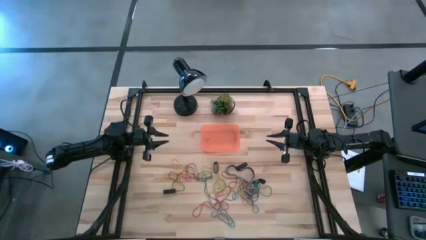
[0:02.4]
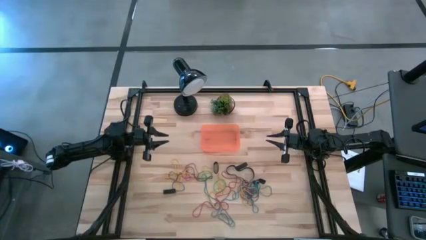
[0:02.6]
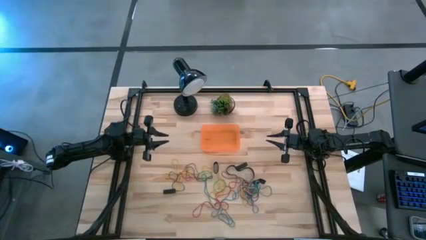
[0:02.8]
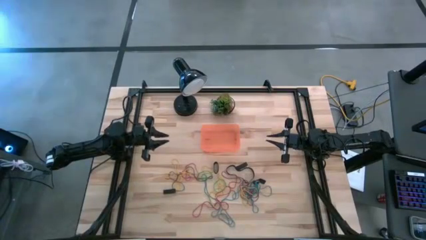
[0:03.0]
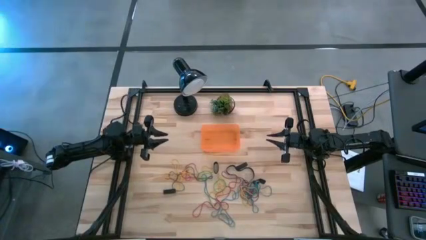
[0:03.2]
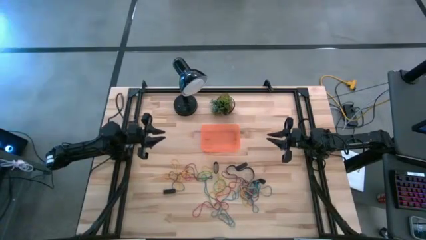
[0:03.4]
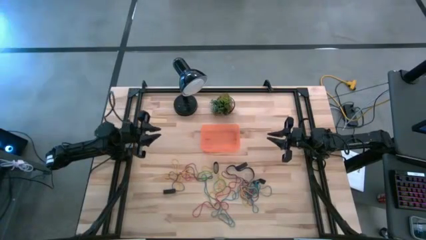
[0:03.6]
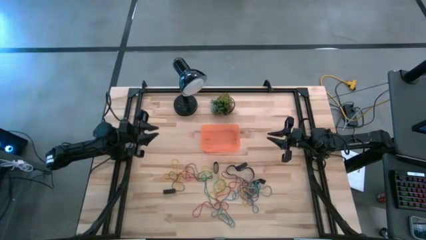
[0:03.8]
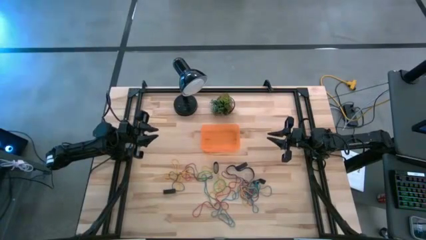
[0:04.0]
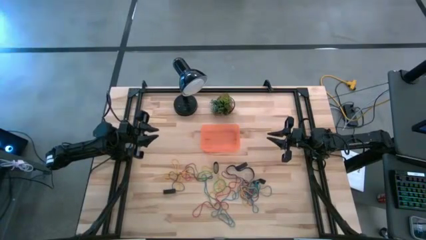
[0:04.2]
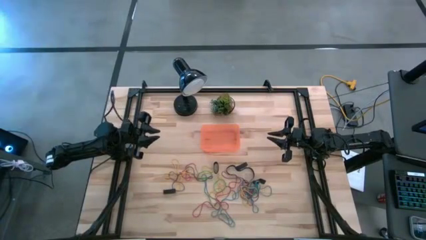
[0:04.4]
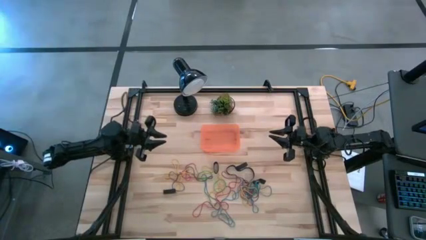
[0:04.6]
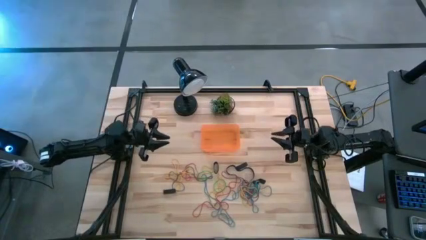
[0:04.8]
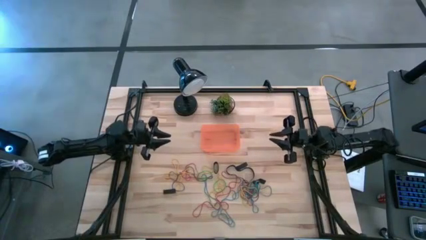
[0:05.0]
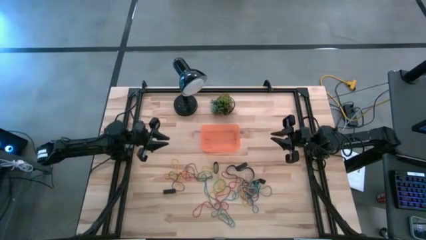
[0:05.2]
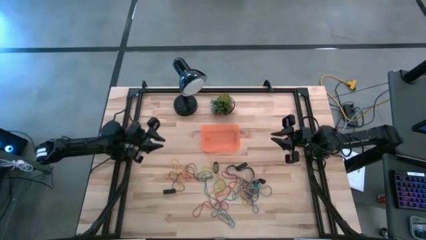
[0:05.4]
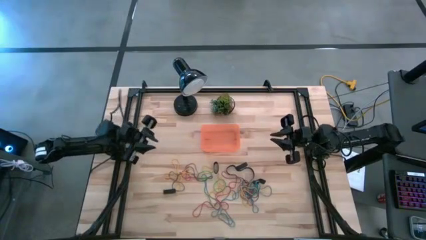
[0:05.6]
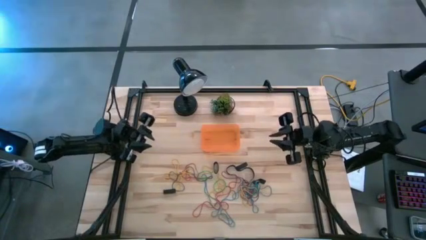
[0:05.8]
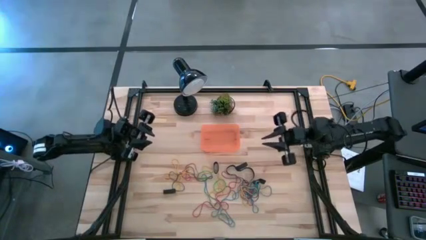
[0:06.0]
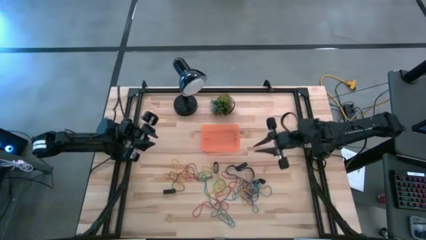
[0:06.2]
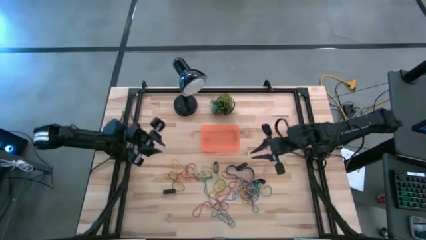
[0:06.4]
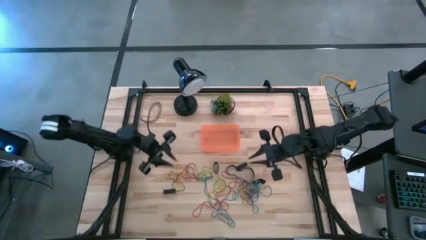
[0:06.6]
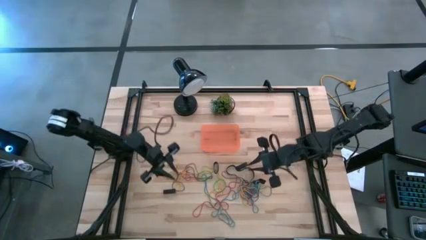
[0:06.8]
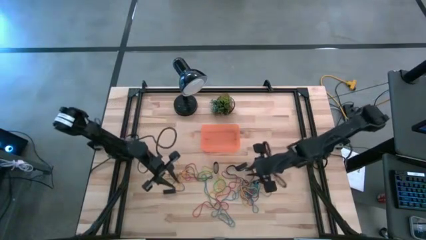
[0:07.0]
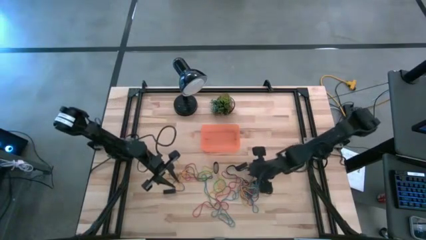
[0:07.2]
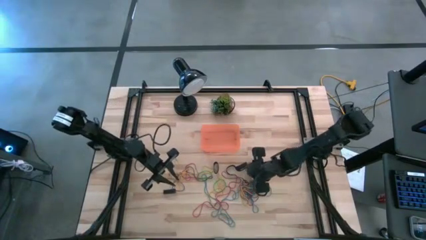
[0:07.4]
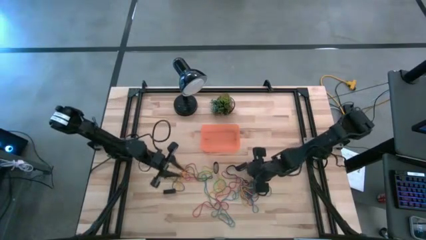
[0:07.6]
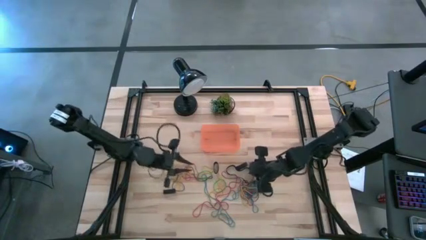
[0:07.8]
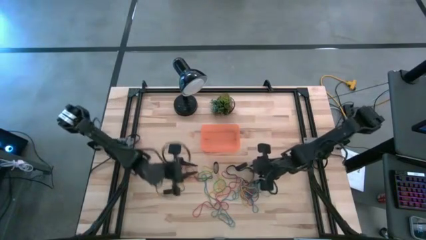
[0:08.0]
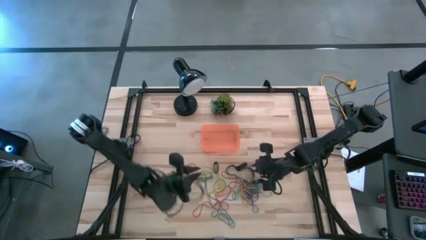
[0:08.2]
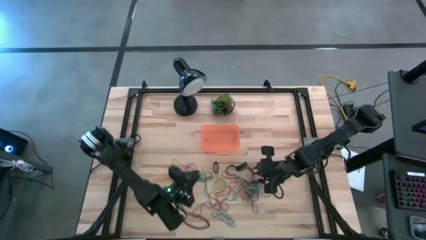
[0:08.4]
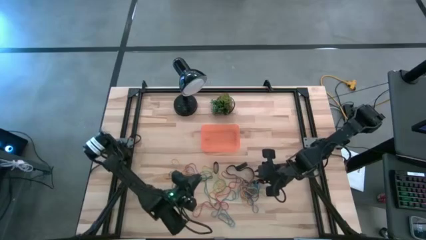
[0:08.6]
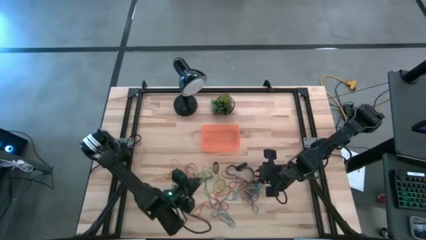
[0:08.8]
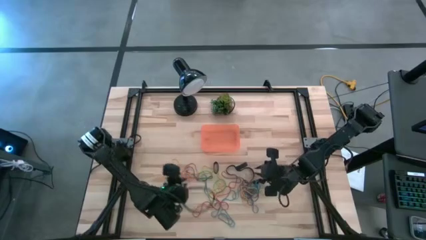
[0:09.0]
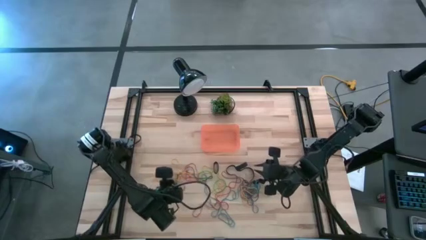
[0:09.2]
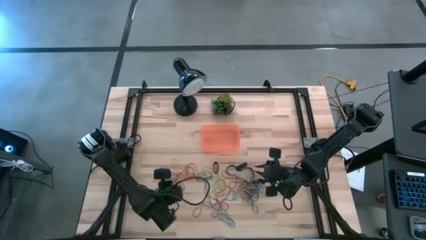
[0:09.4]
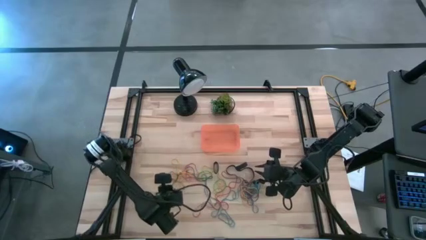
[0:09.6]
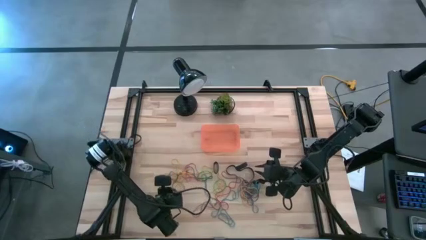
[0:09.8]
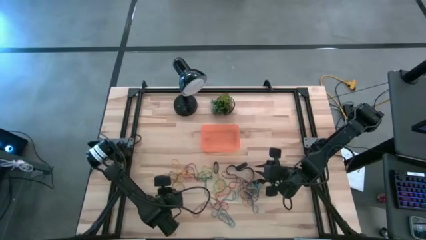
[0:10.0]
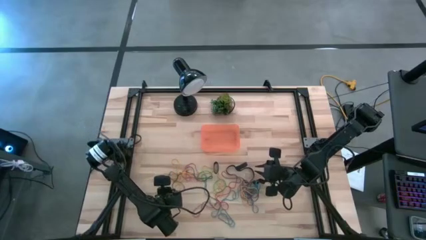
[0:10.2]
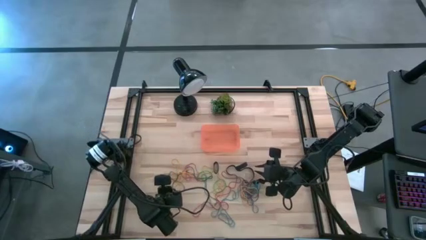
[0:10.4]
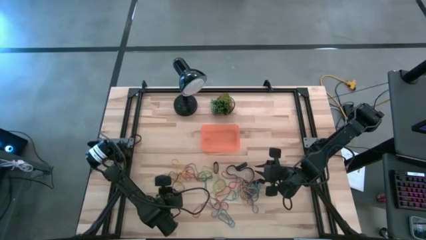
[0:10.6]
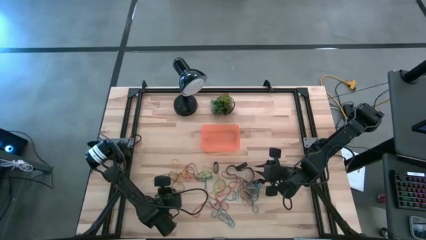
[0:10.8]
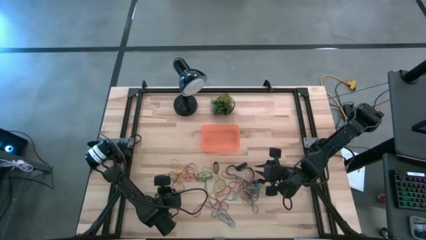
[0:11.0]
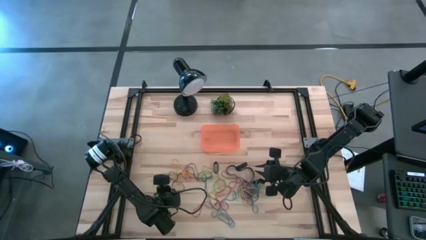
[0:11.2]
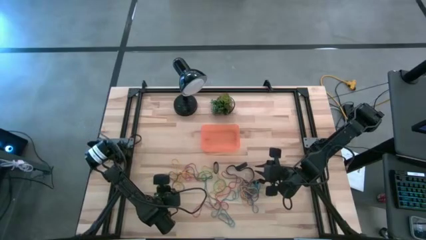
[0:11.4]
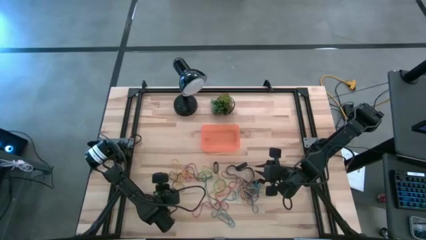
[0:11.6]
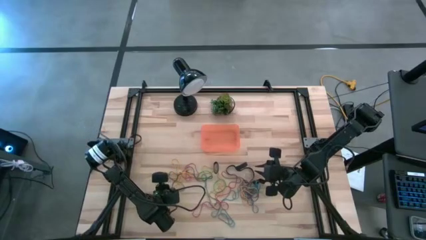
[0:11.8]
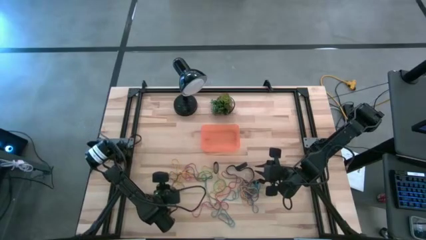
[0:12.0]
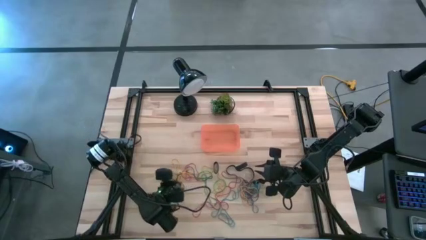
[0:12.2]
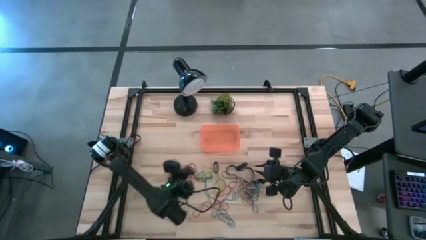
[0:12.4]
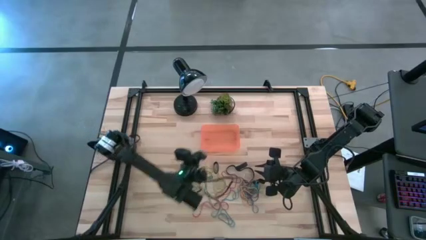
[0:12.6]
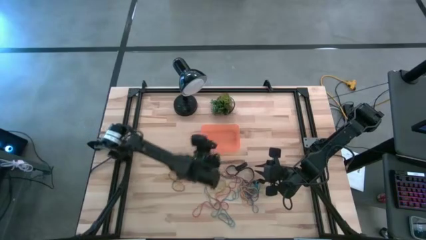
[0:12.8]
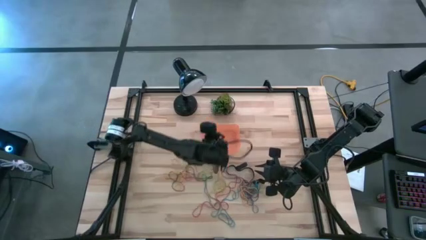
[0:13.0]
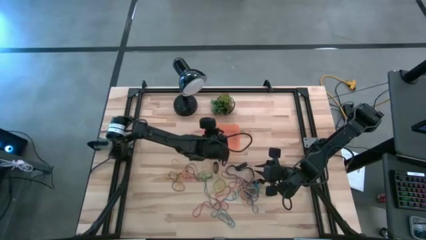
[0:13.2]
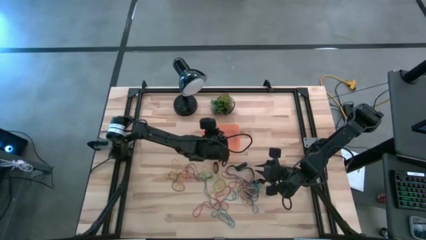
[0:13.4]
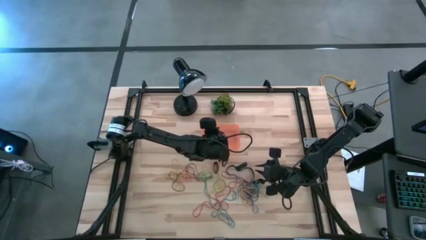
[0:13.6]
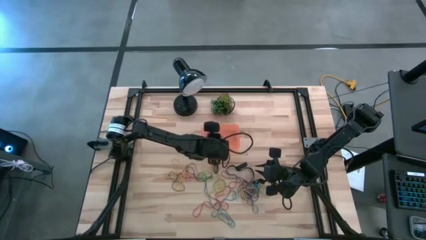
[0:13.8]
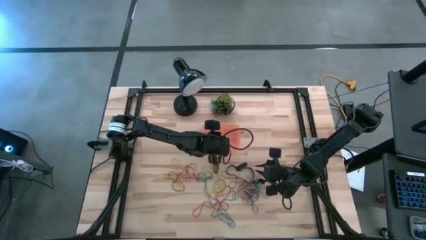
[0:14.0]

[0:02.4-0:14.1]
Task: Pick and place rubber bands into bin
Put the black rubber band into the orange bin

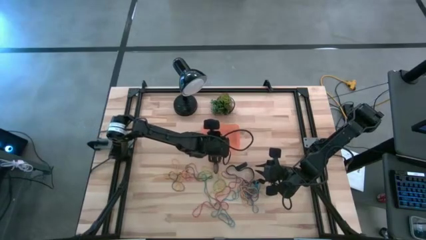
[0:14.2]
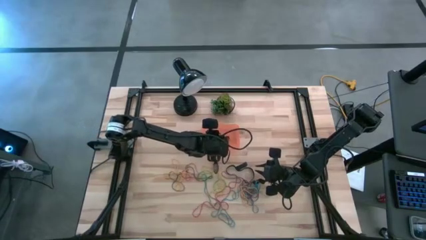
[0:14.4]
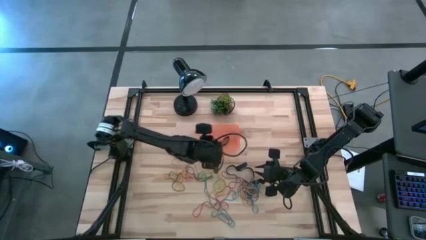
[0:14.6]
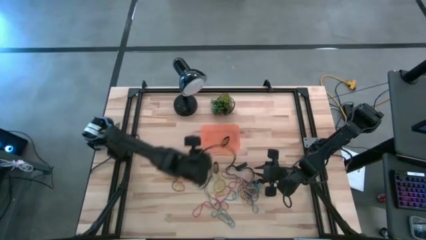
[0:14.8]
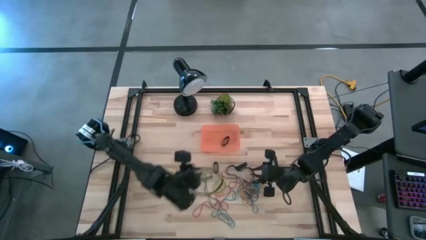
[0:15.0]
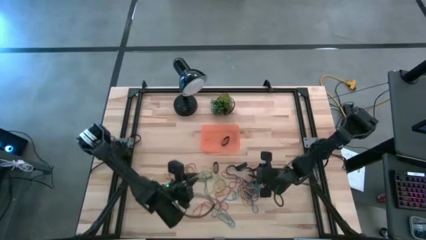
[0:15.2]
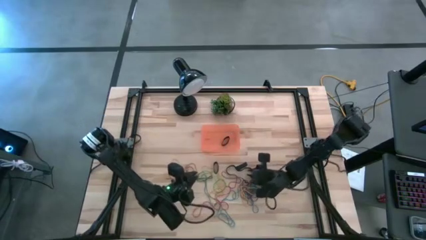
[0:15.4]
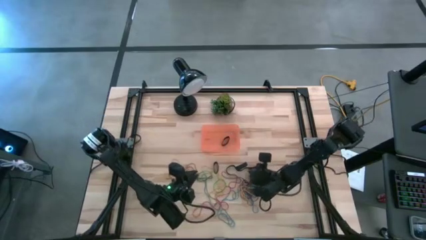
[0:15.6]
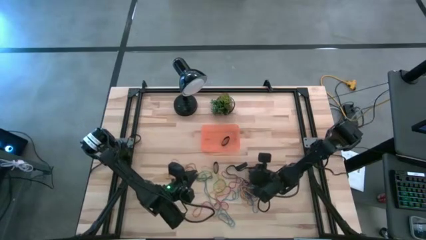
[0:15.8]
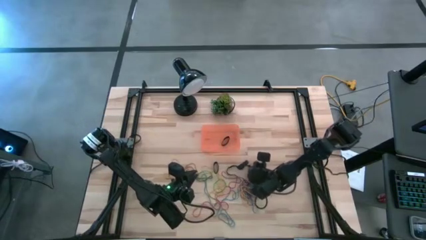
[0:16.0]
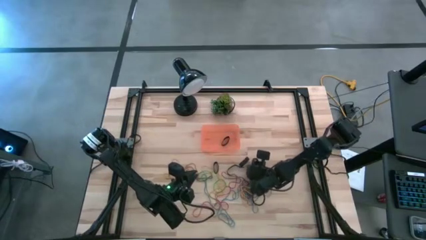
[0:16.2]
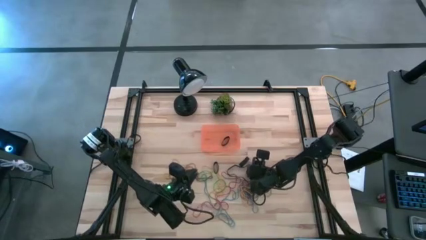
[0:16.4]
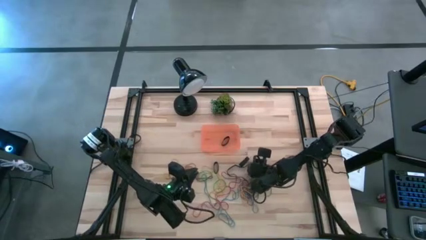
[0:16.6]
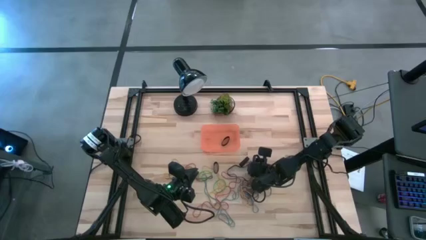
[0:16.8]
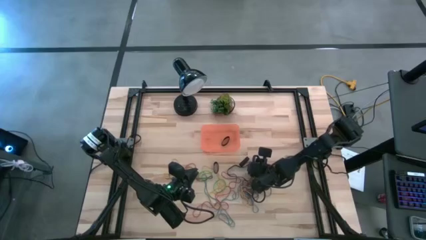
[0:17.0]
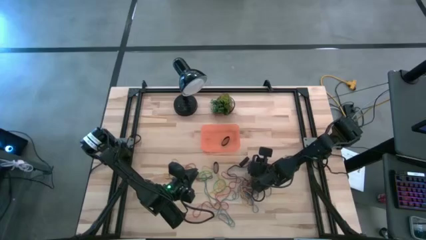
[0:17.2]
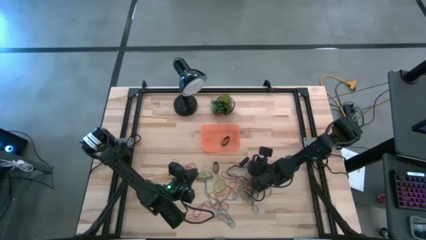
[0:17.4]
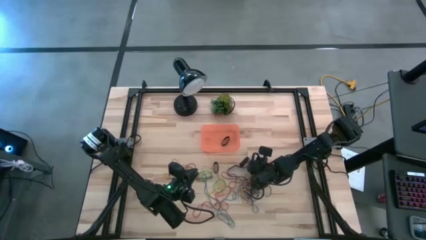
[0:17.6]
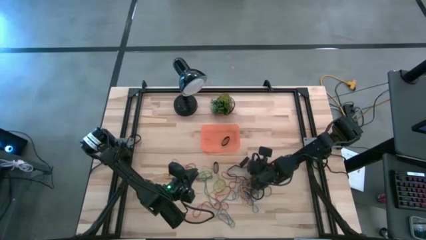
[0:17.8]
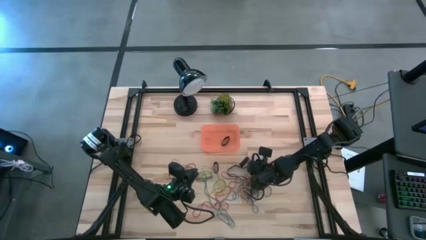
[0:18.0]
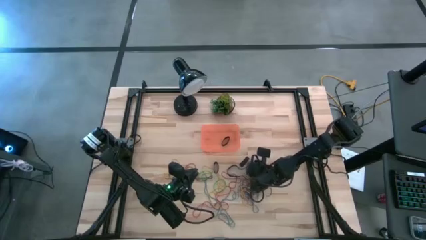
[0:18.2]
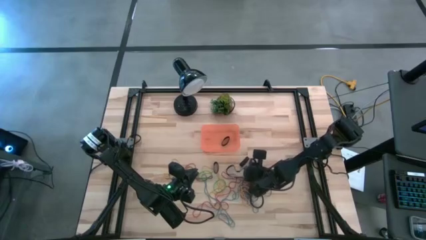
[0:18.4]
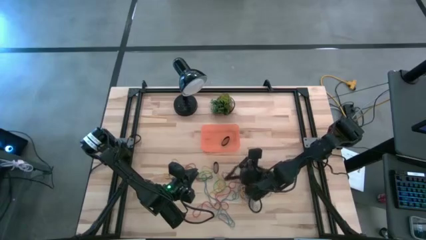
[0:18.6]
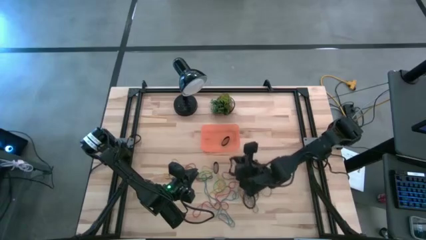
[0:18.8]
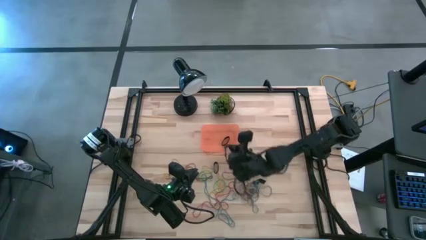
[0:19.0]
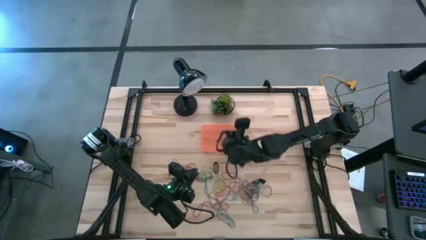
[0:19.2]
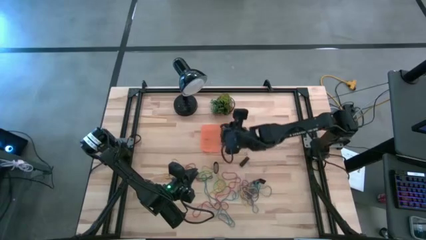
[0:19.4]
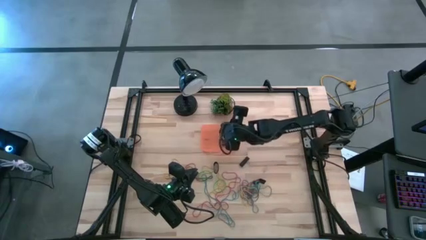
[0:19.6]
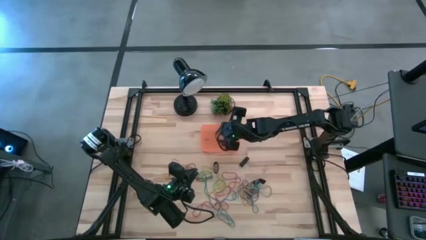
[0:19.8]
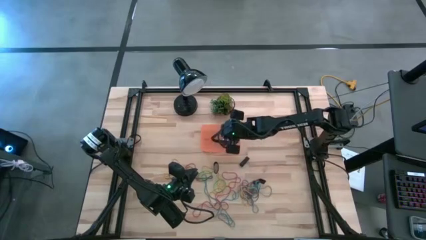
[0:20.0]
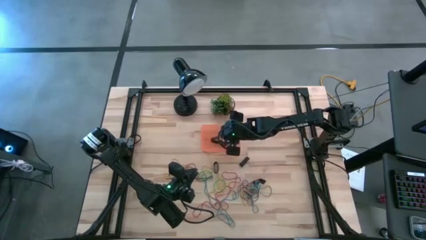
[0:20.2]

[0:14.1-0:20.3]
Put the black rubber band into the orange bin
